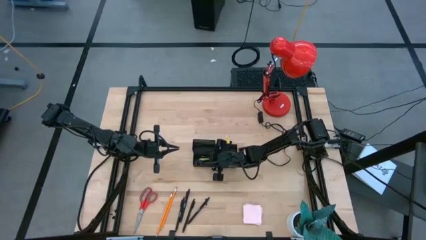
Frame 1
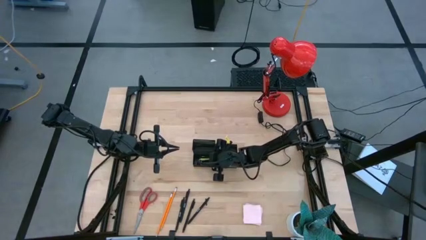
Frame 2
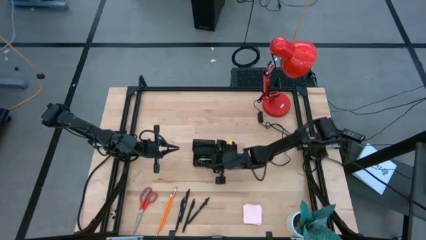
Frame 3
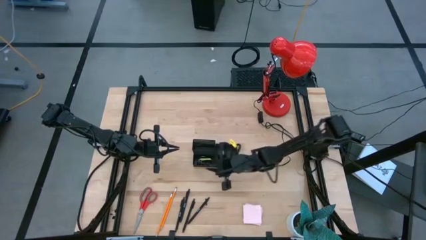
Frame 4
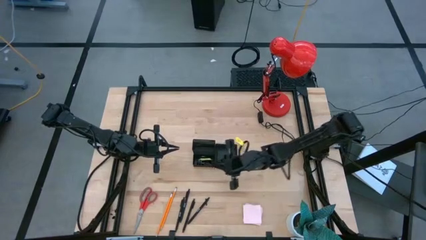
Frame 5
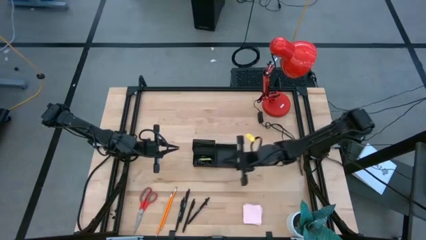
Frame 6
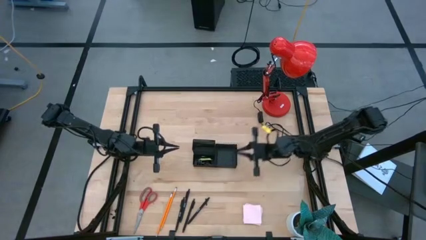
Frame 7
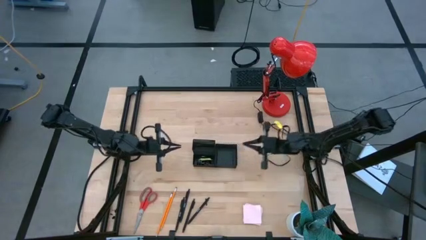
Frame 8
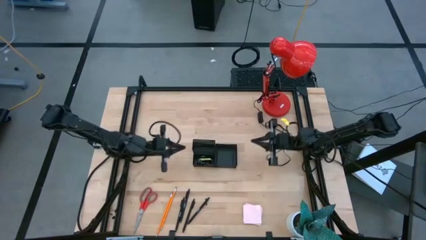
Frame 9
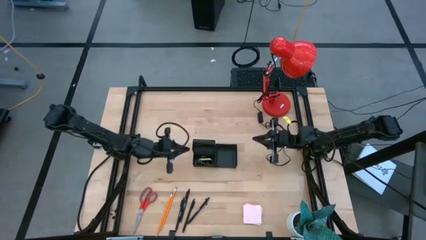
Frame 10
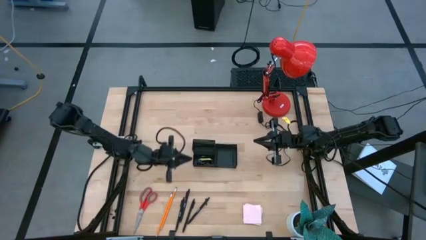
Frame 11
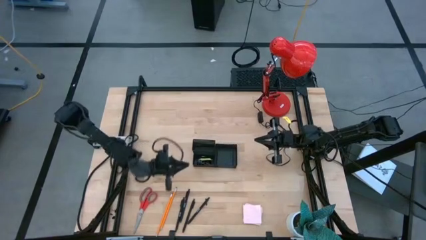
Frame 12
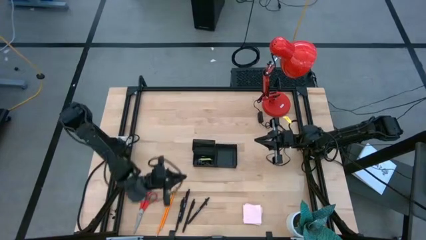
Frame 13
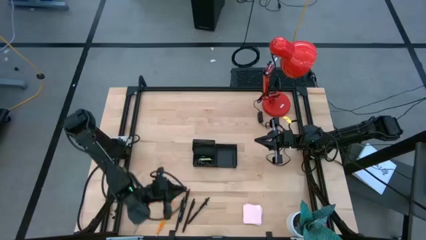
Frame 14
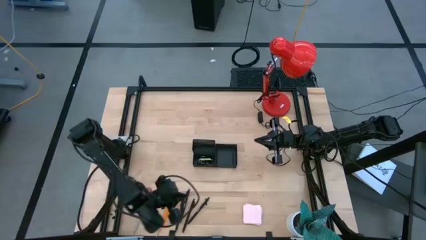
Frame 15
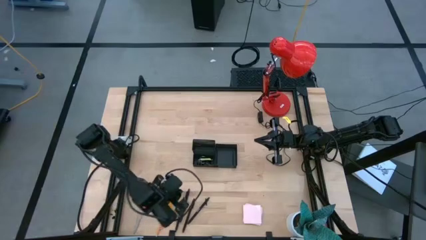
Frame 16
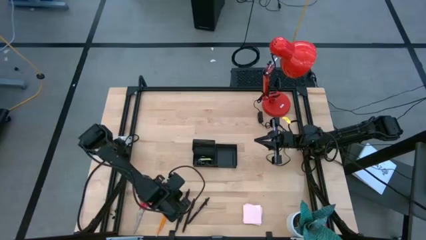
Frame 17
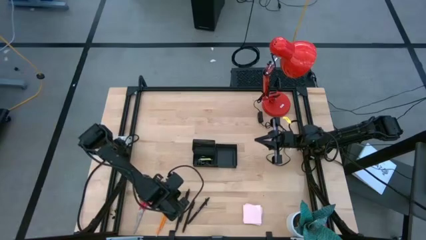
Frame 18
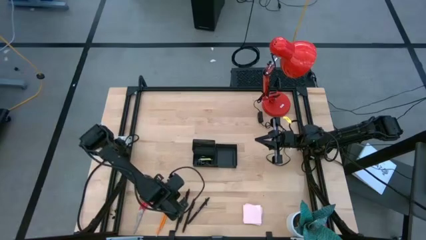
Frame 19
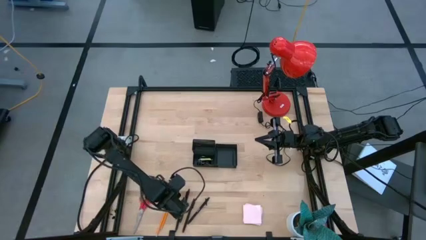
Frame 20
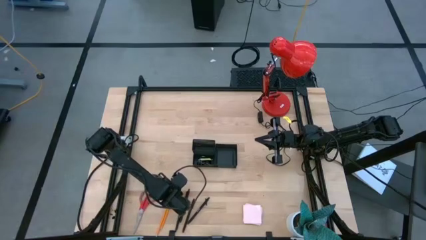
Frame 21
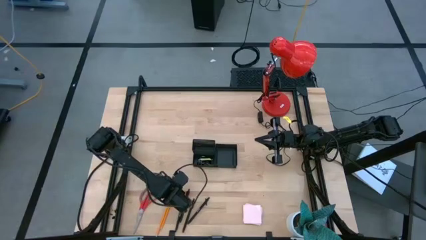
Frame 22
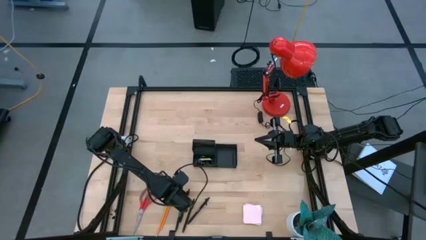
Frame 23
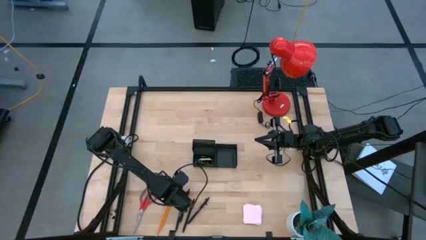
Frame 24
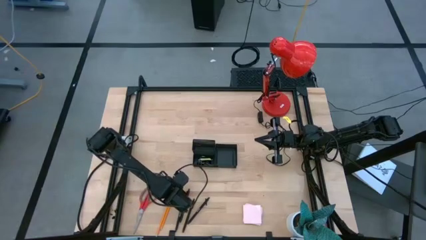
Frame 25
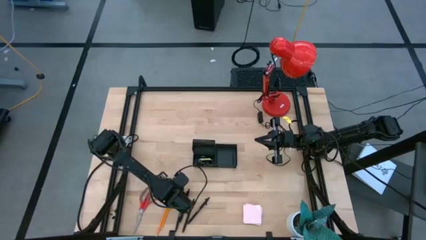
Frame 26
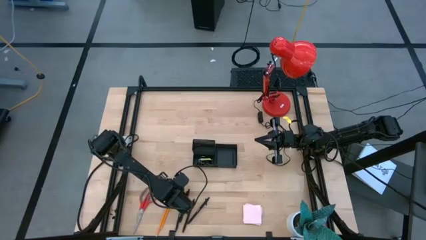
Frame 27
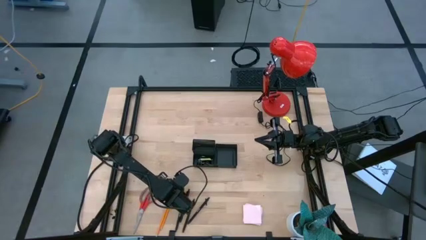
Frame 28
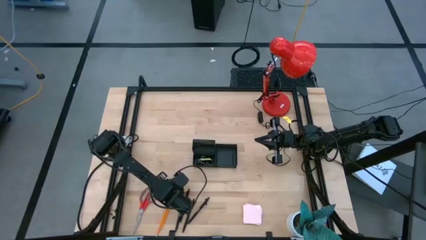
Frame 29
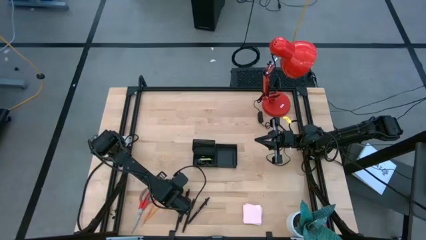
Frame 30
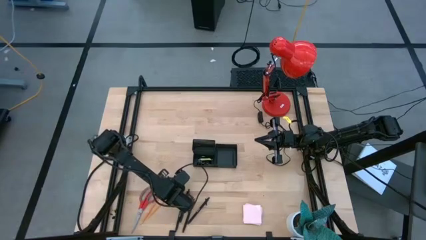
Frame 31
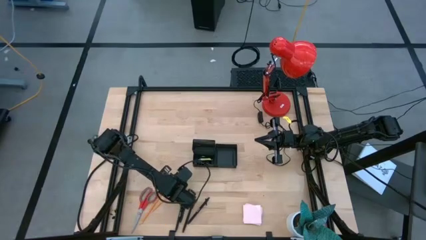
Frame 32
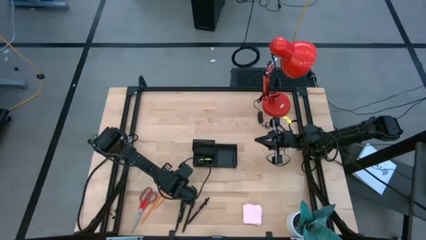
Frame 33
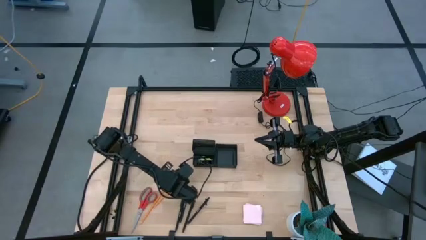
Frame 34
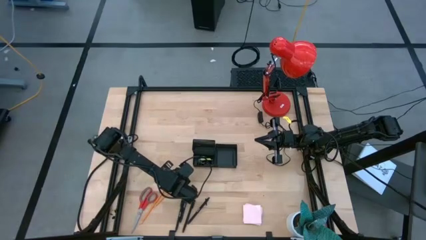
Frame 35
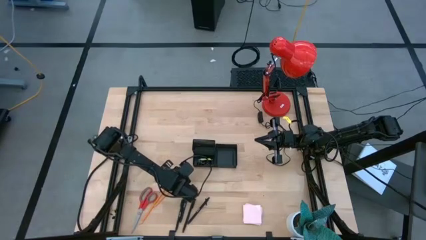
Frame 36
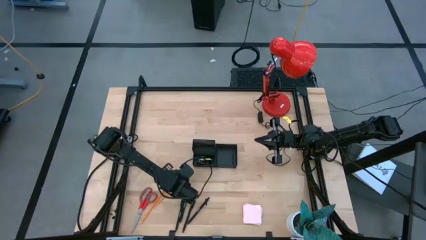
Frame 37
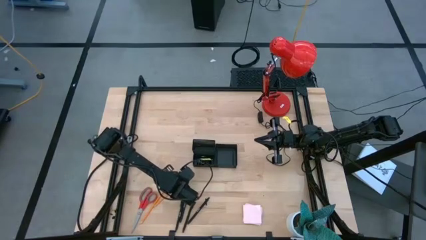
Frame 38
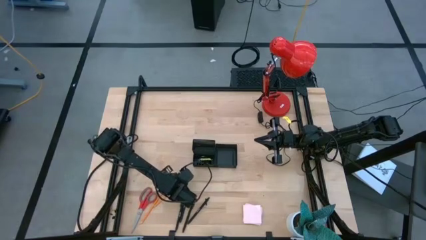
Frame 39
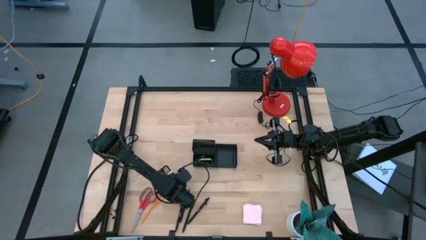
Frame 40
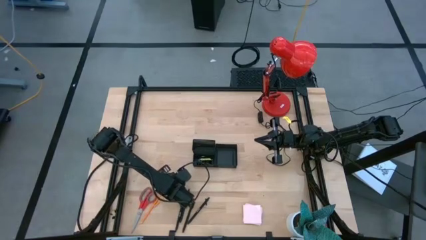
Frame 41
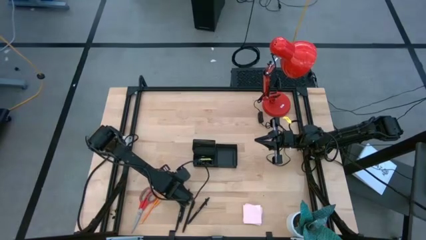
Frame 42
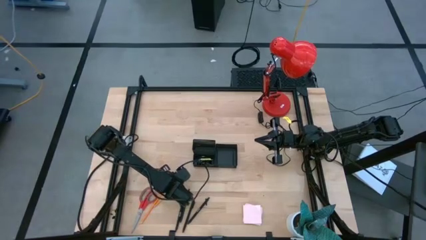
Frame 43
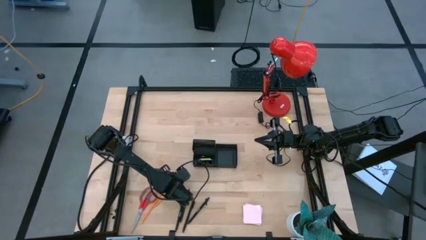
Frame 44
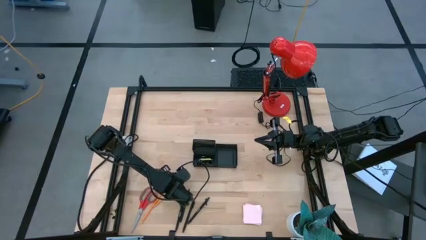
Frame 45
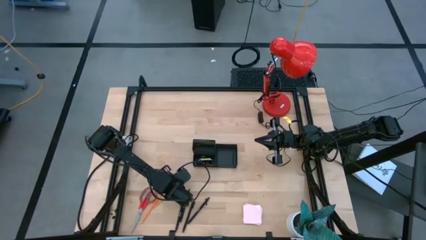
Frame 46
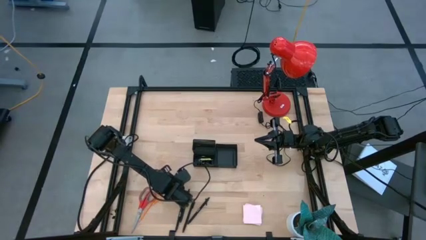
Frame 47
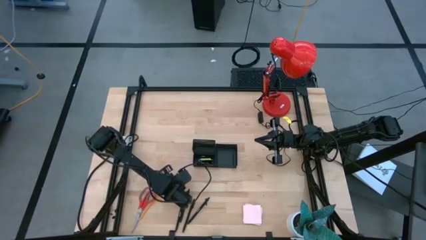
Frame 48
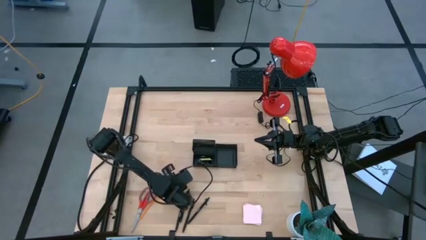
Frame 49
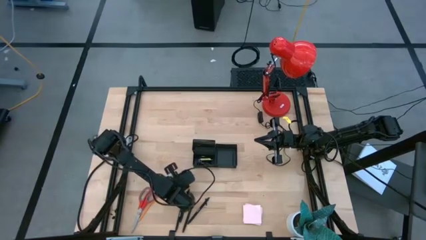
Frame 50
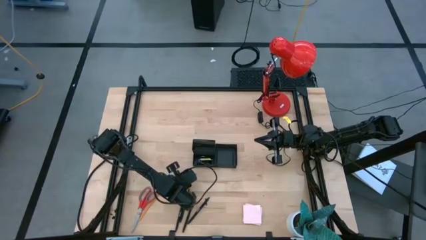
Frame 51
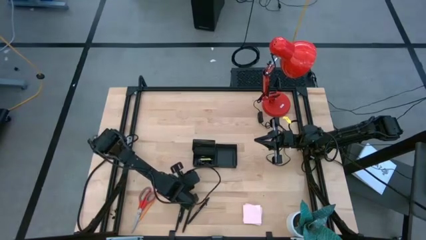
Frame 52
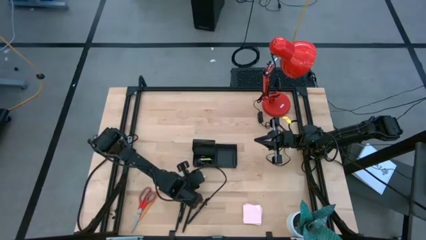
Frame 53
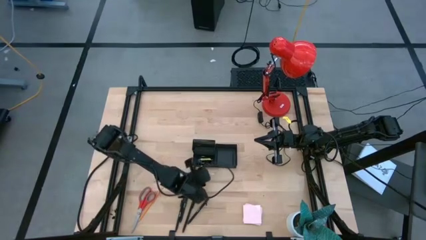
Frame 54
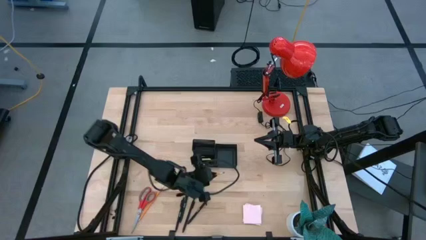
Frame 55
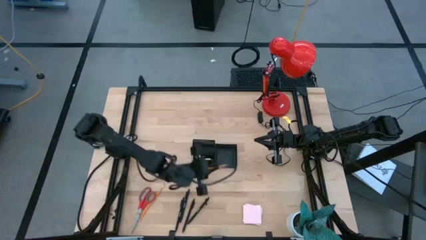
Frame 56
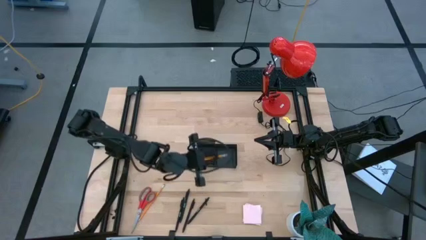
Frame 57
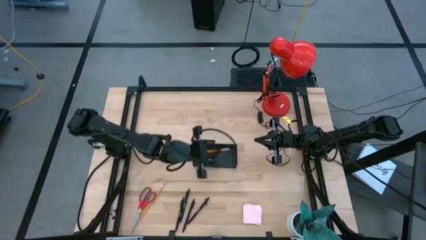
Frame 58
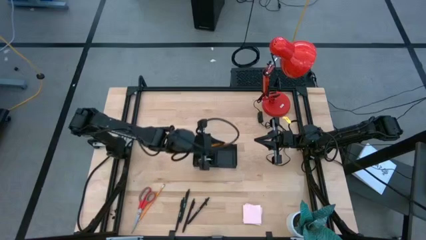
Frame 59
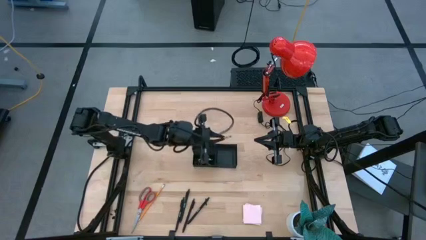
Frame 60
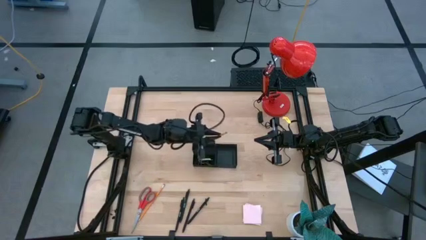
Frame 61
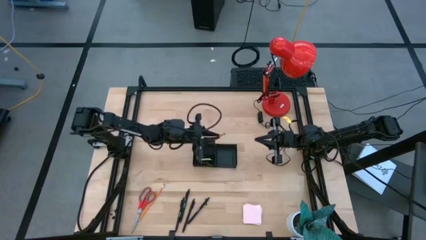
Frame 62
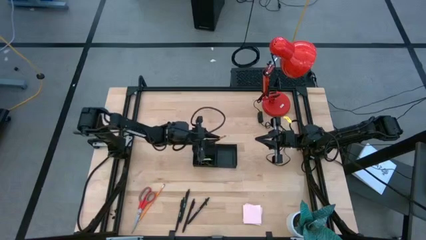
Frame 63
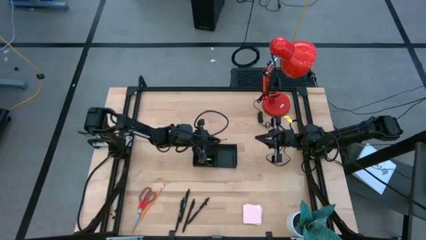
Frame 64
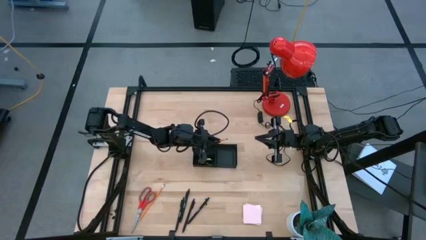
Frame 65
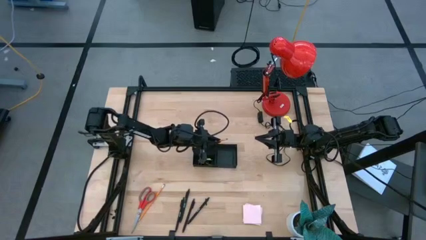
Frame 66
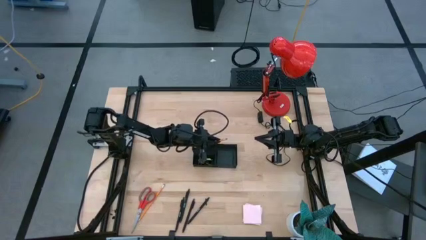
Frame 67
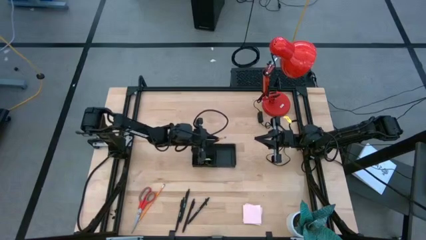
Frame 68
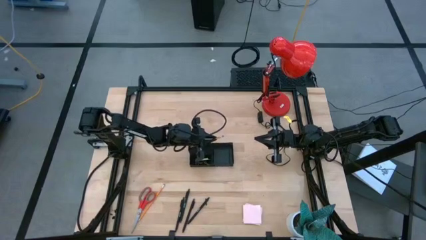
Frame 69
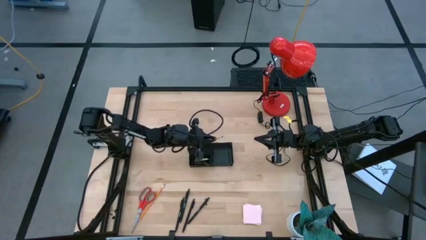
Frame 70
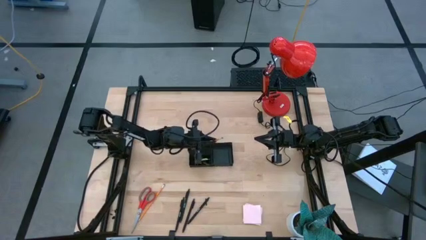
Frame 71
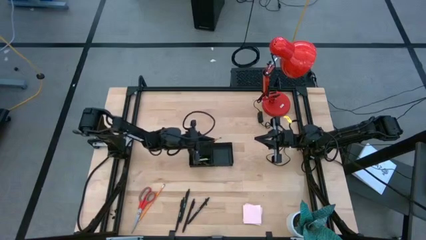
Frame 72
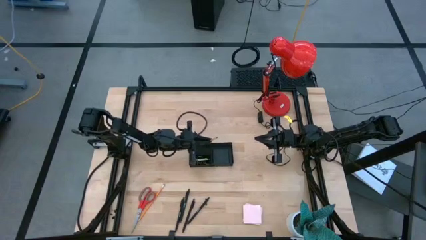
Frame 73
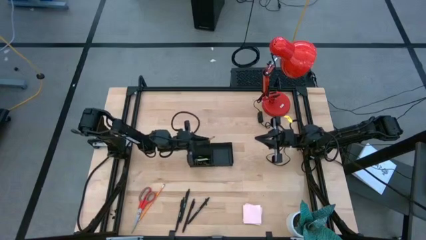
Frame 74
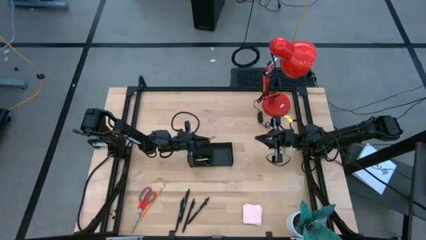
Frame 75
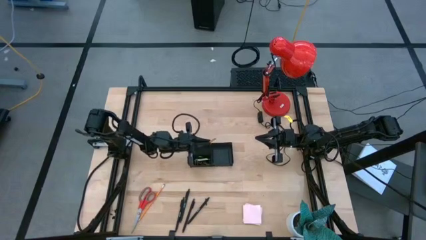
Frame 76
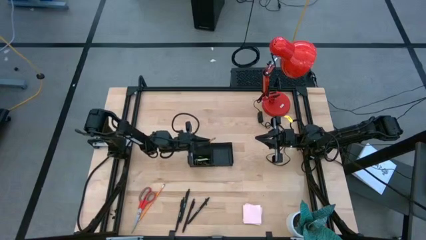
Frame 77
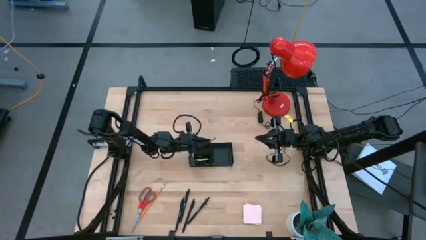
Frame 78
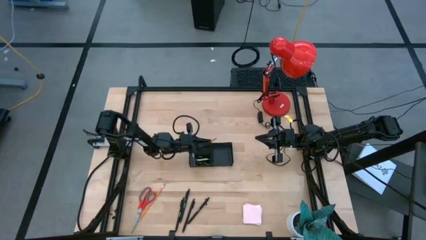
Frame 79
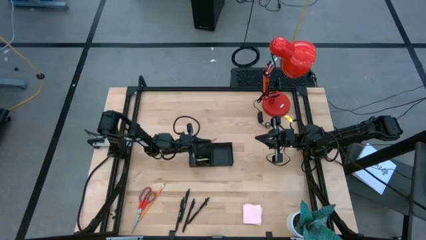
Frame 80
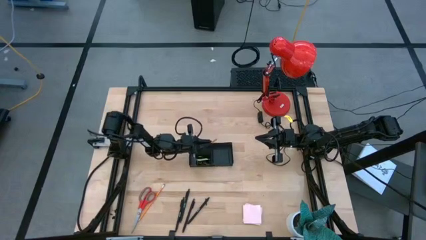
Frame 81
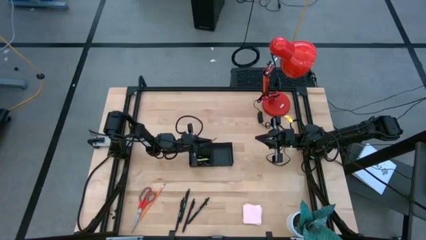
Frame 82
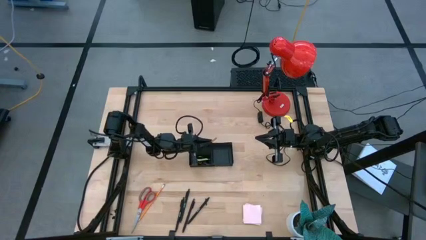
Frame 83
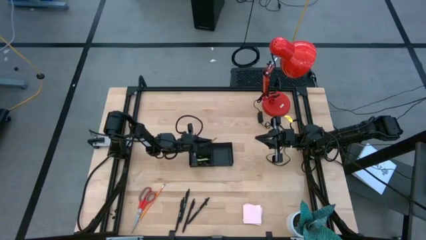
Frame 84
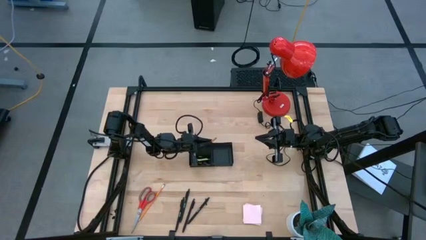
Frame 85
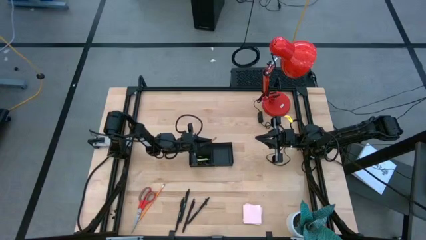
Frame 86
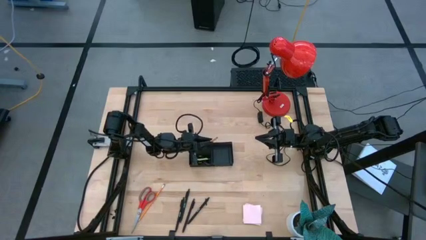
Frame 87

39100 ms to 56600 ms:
Task: Pick and place office supplies into organizer
Put the pencil into the mesh desk organizer
